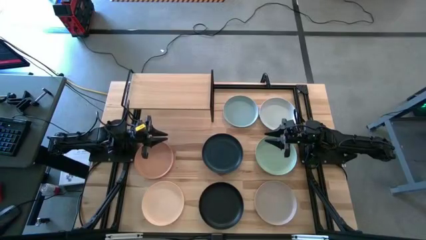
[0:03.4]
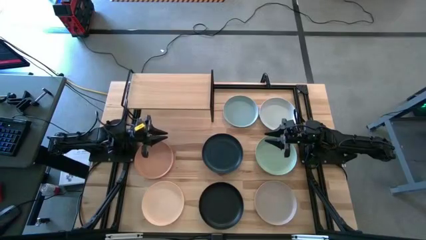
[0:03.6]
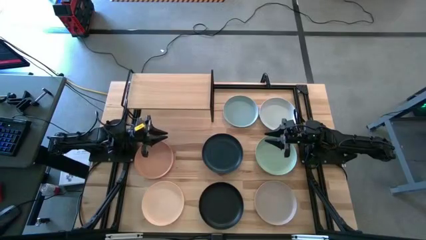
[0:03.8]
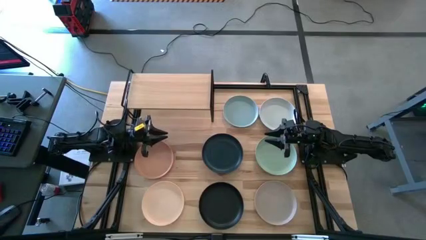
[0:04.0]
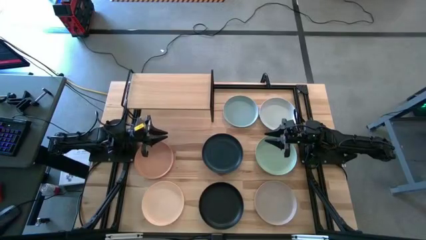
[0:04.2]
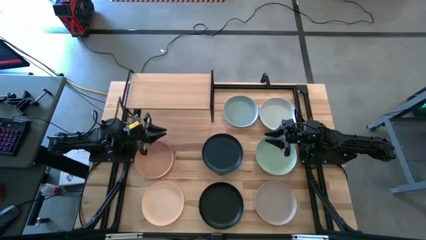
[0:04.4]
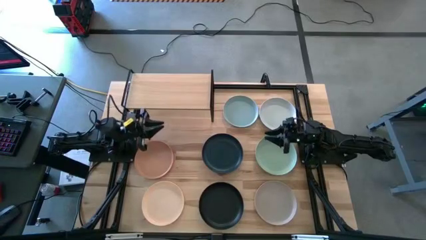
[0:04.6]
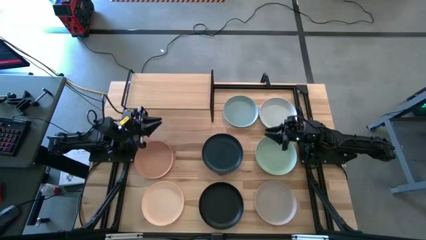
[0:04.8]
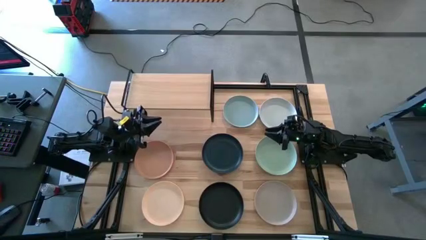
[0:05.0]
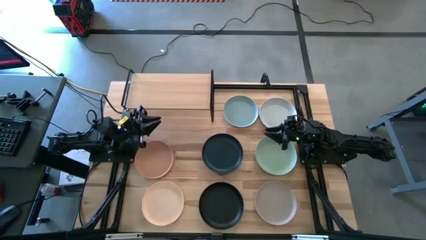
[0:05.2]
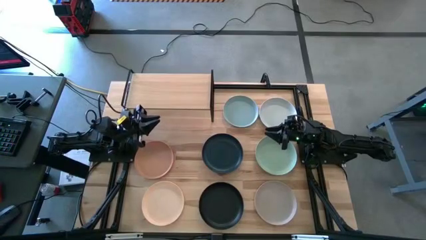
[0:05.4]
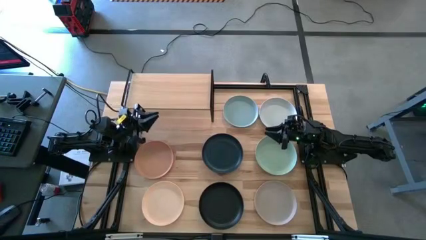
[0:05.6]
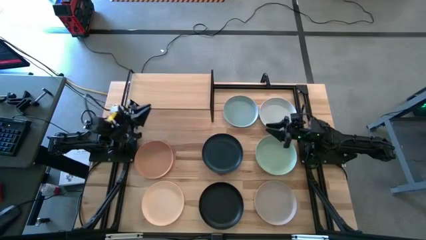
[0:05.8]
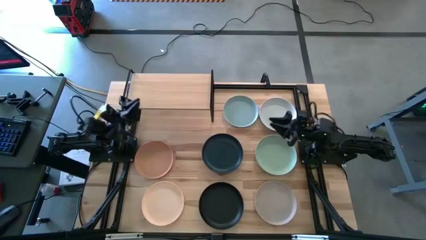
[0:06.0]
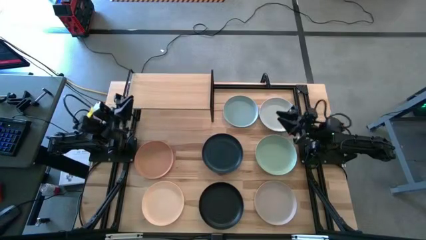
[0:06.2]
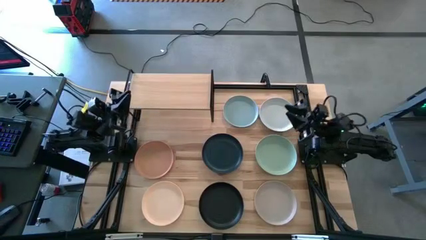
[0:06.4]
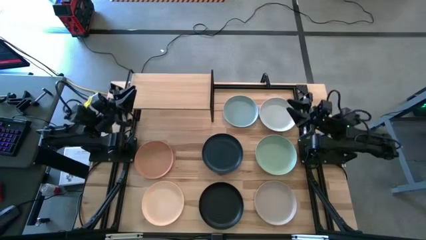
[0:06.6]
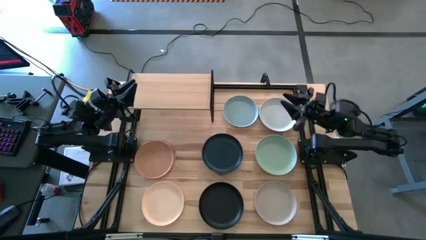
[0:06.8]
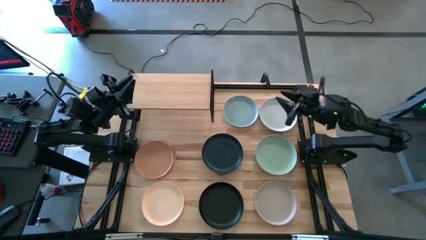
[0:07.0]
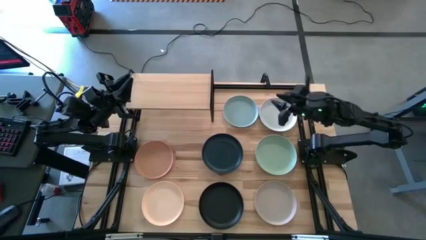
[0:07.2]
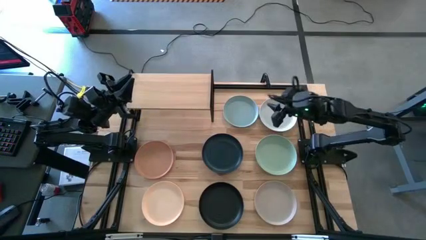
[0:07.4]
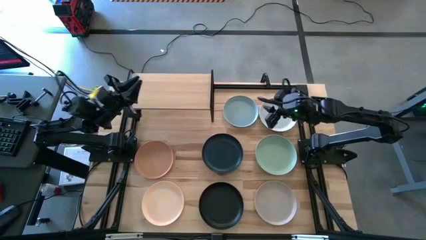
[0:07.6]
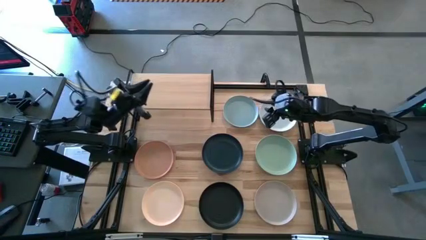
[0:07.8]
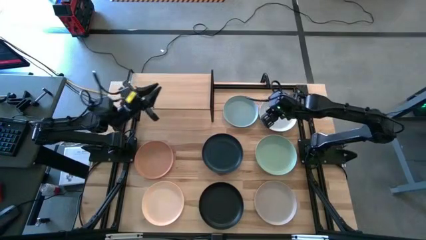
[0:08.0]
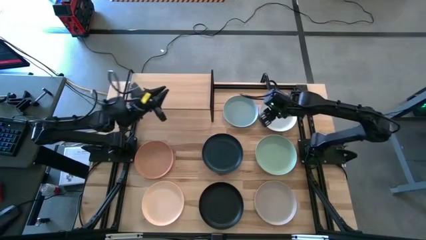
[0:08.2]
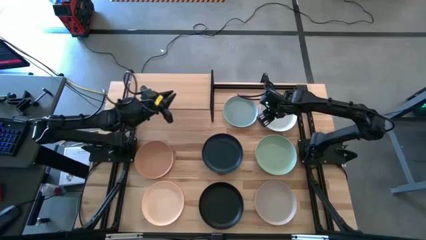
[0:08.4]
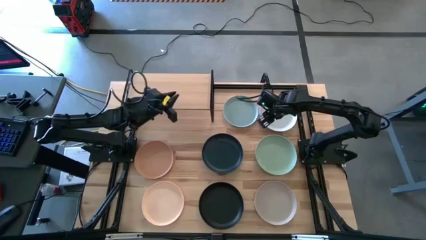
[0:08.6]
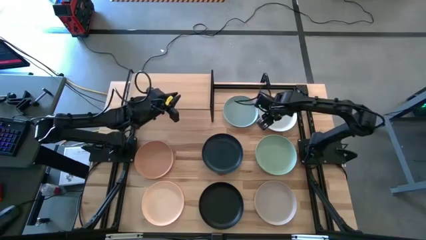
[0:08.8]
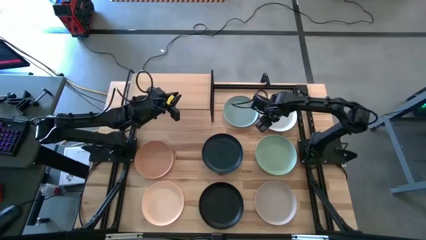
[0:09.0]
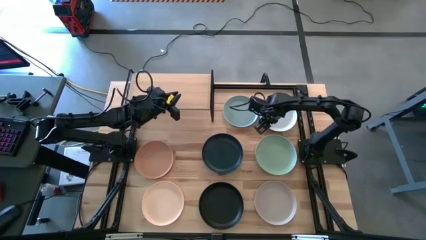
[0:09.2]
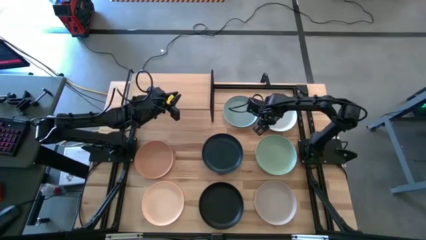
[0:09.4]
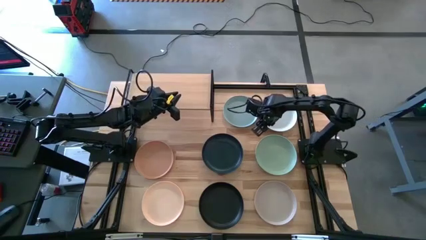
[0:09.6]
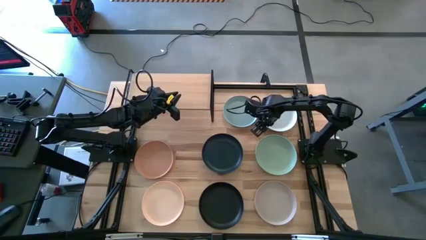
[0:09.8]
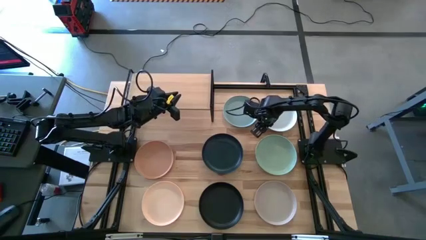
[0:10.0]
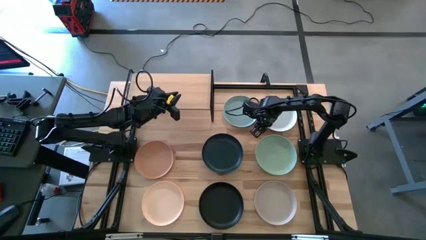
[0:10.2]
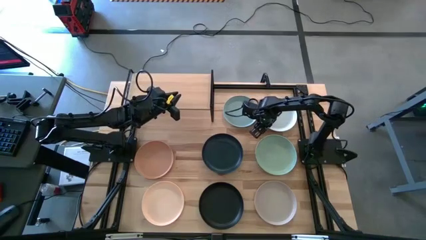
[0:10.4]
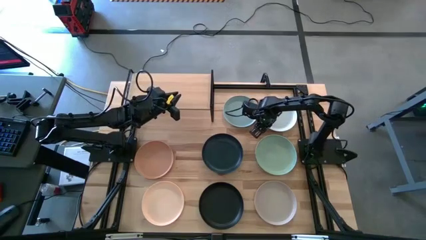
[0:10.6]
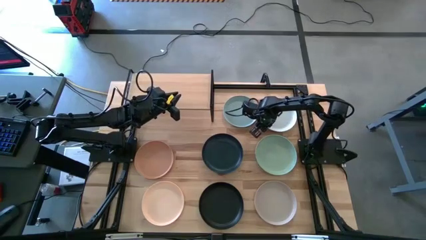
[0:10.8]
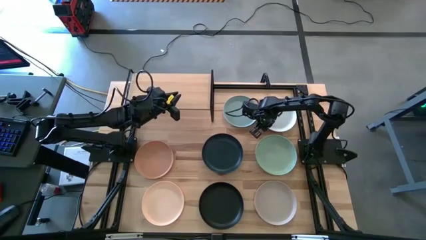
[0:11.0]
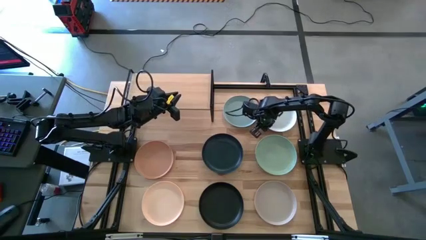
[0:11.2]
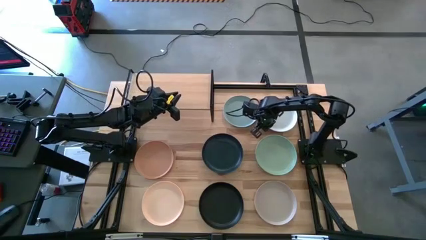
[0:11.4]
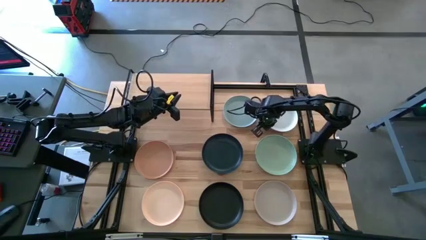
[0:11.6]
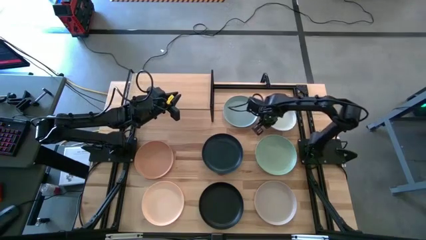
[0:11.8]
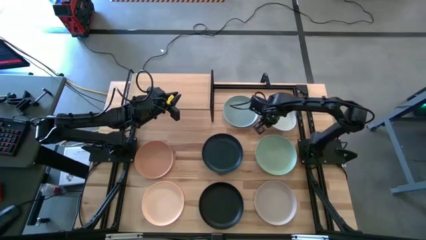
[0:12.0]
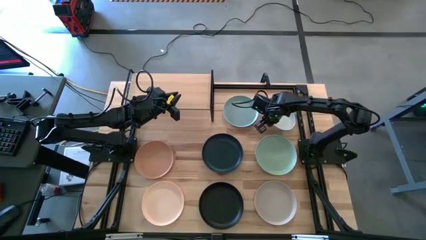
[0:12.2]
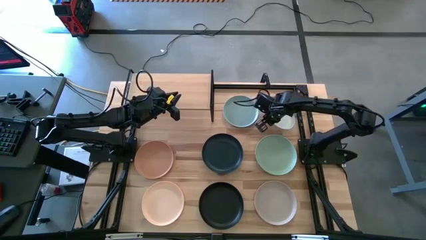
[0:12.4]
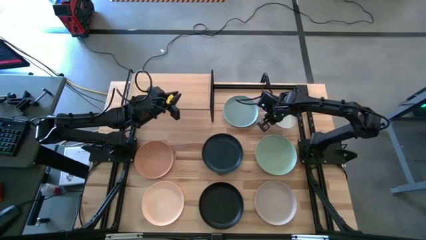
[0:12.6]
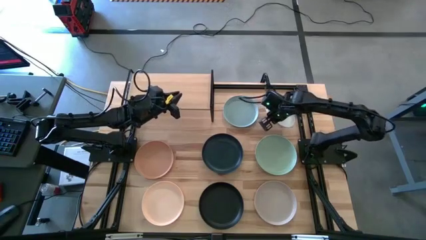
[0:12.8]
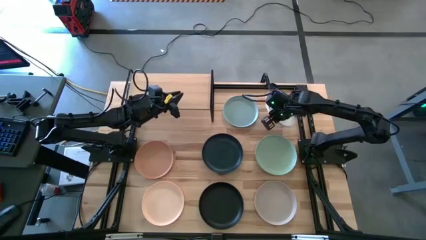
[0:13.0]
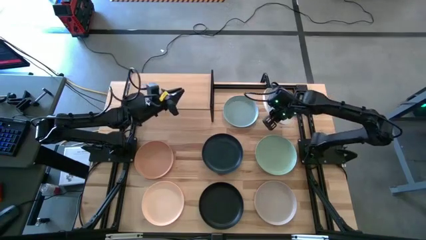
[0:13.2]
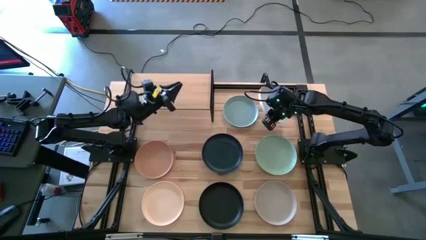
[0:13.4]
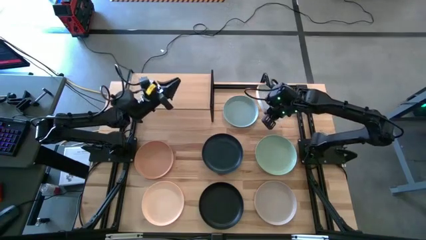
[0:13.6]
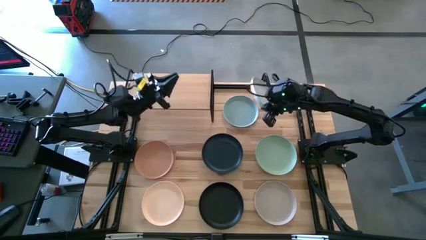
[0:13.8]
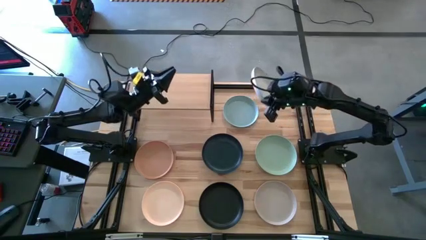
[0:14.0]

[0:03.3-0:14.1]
Task: Place and stack plates onto a shelf
Put the white plate on the shelf

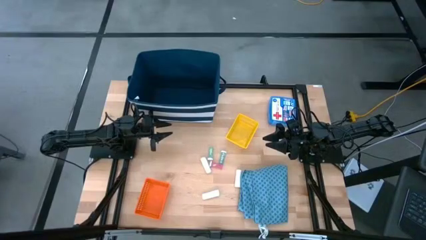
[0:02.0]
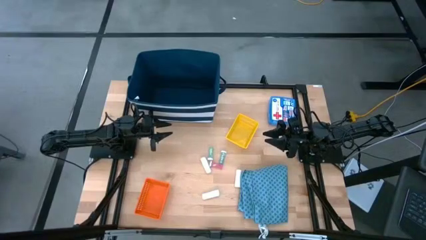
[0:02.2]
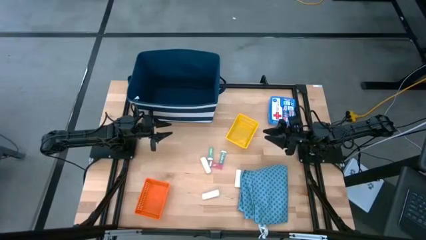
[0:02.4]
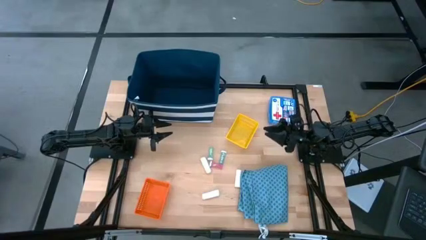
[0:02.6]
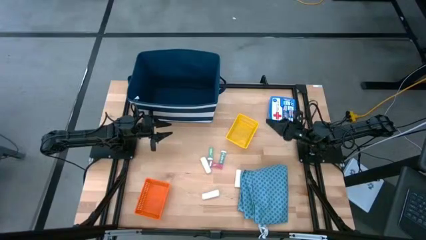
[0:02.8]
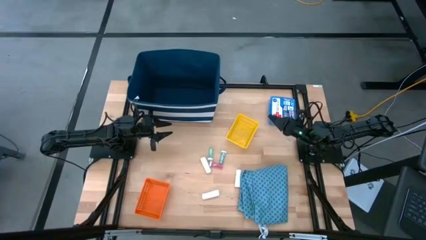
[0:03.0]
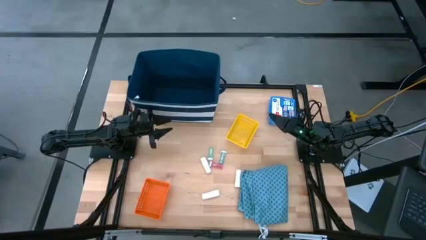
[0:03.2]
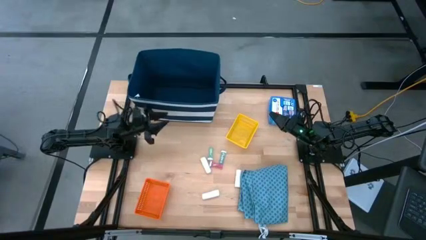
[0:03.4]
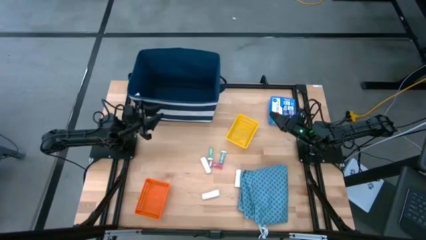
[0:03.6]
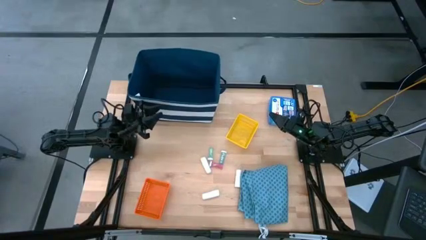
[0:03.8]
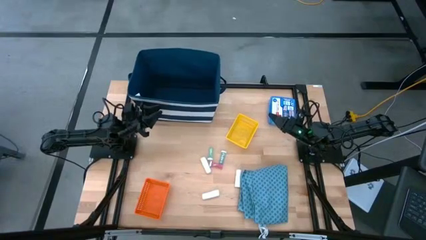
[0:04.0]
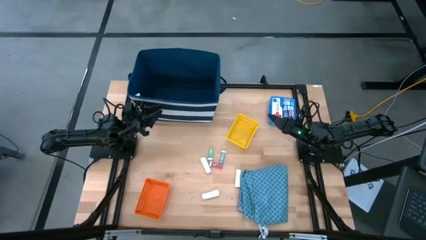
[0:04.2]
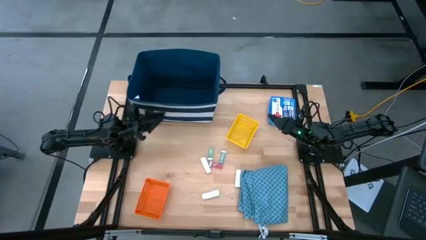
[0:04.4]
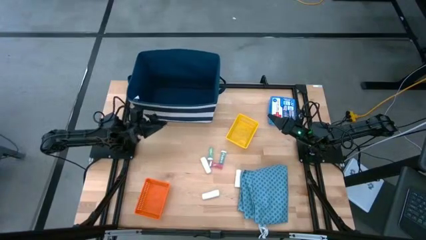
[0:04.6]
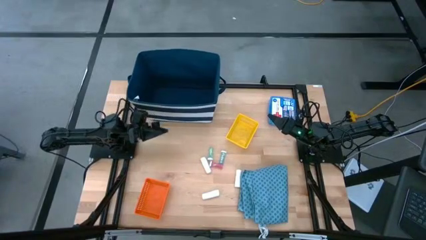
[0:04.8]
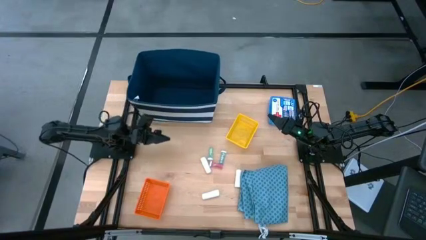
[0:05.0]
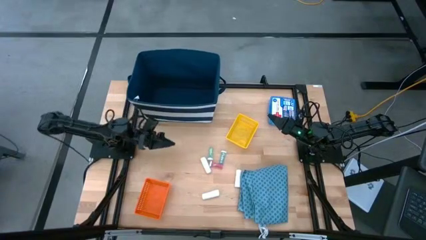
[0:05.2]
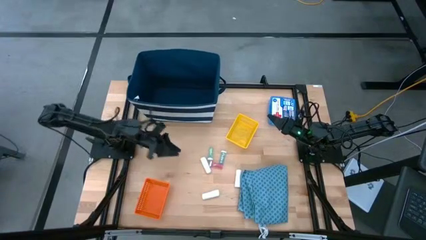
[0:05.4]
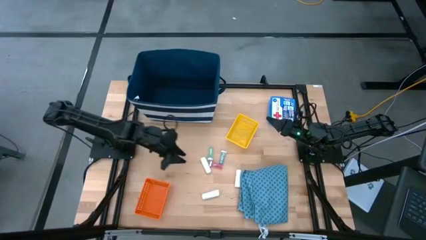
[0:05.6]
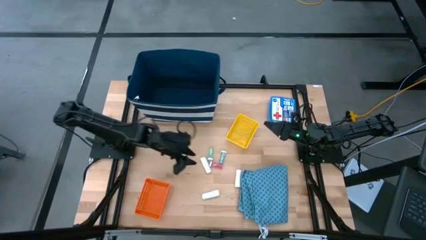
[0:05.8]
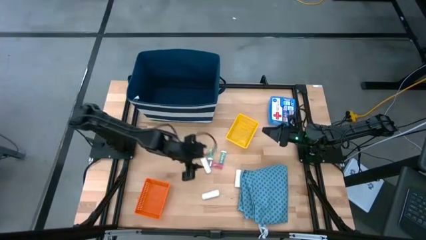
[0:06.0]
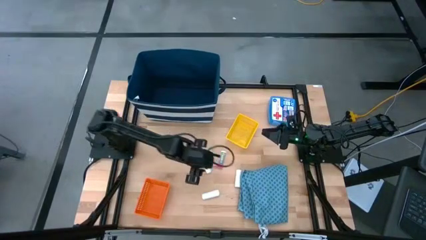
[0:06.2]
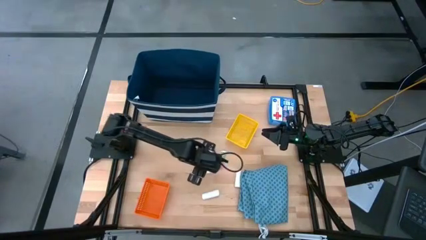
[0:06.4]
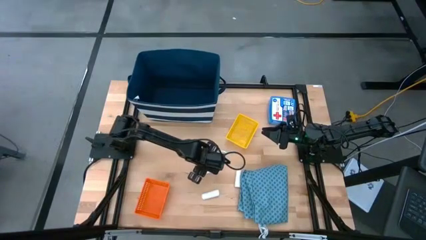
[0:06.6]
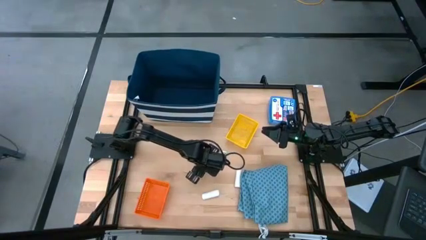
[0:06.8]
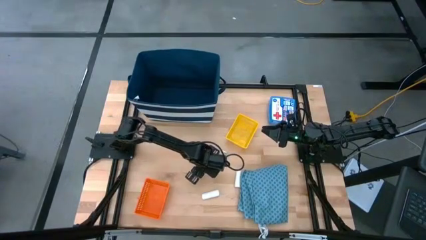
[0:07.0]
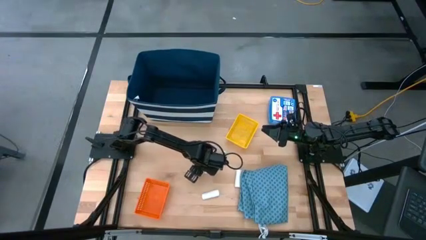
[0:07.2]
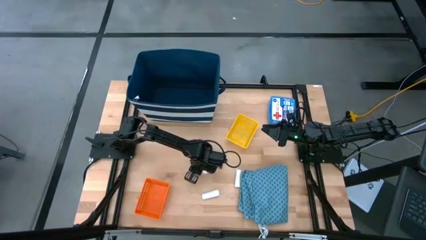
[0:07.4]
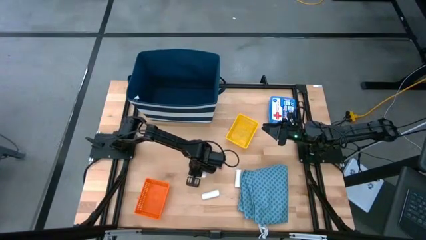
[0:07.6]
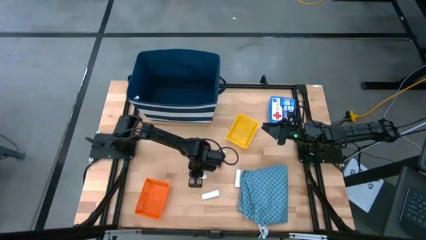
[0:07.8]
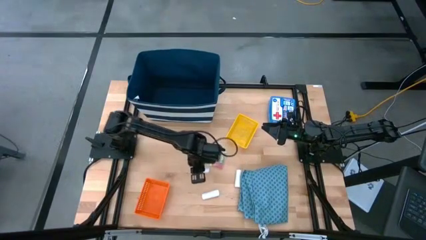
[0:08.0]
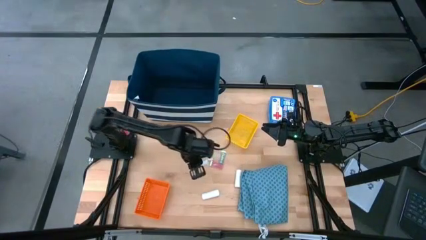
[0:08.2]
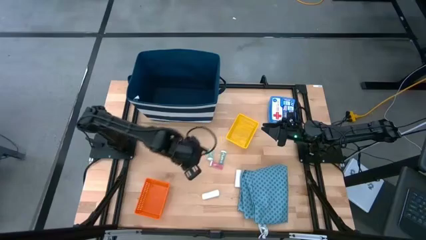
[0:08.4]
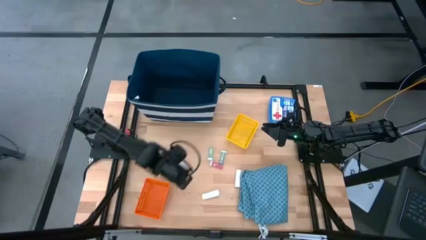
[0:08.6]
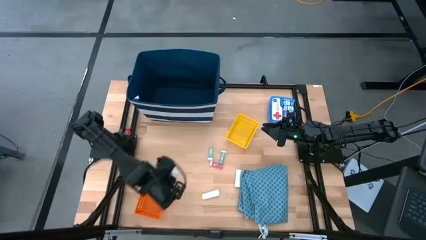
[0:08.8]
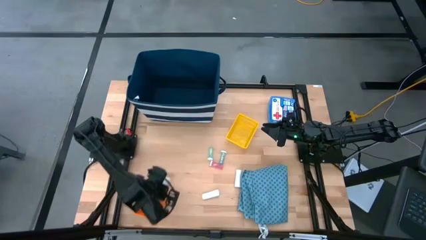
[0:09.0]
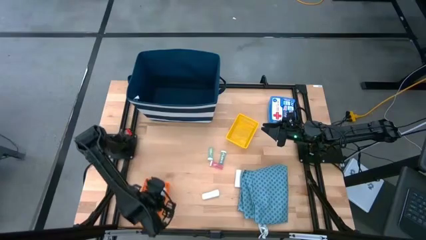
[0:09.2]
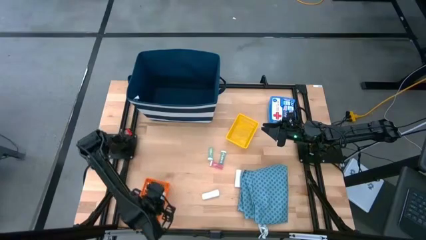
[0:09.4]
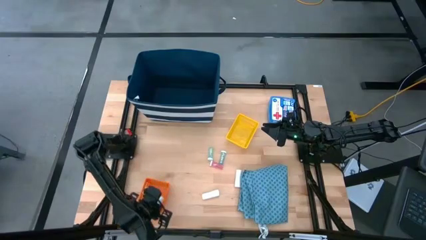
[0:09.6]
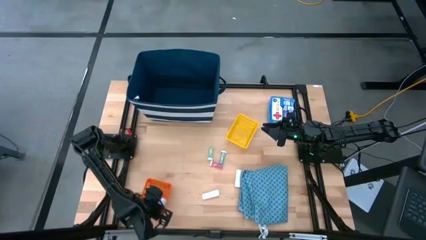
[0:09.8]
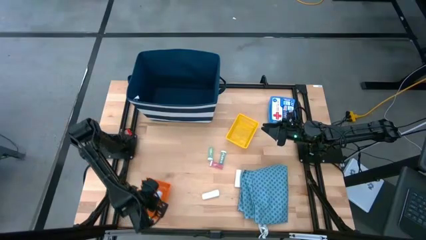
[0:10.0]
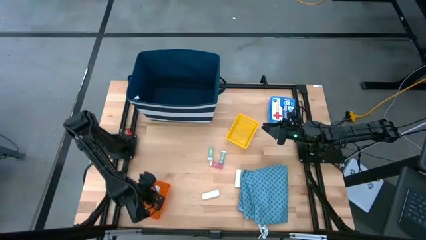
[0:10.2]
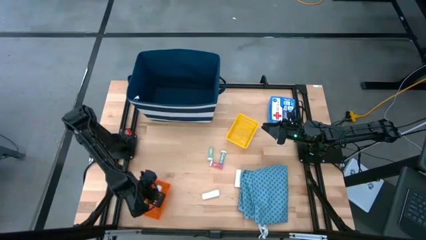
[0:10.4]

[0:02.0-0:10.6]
Task: Pick & place medical supplies in basket/bin
Put the top left white gauze in the orange bin
